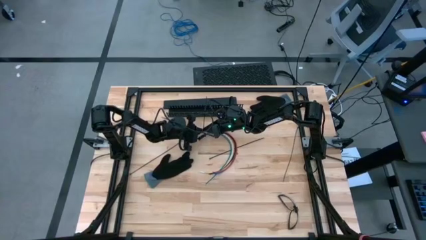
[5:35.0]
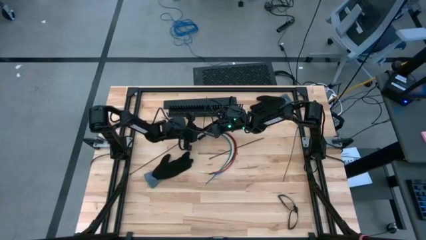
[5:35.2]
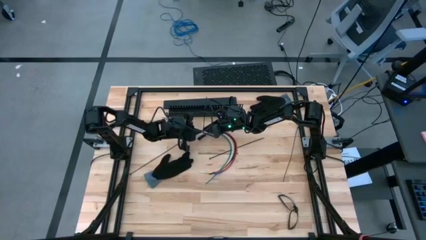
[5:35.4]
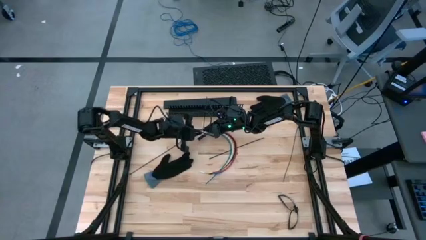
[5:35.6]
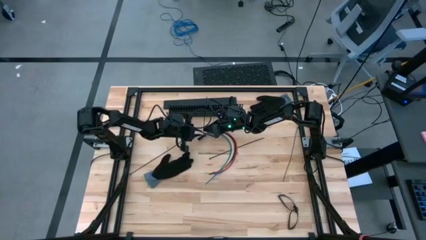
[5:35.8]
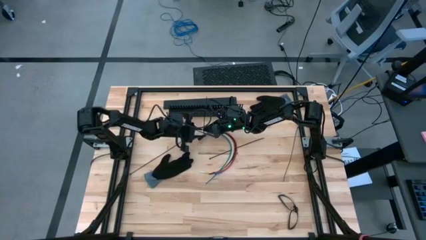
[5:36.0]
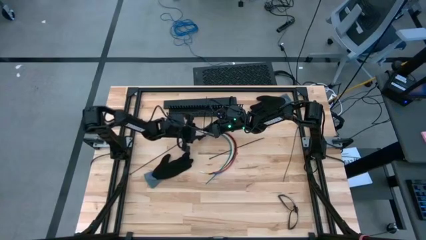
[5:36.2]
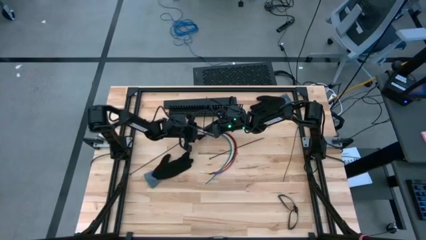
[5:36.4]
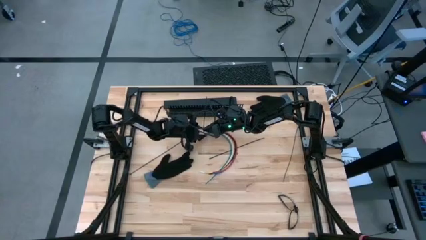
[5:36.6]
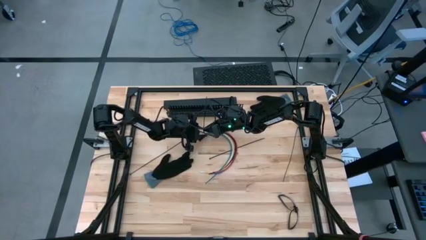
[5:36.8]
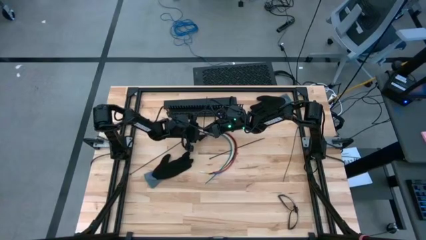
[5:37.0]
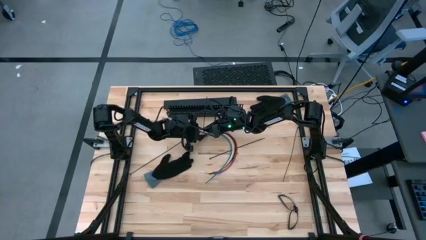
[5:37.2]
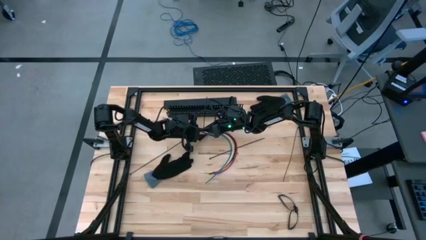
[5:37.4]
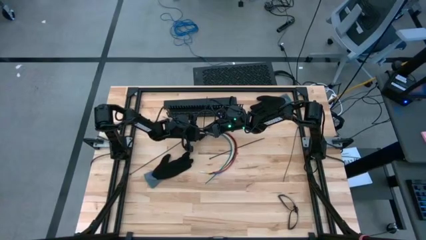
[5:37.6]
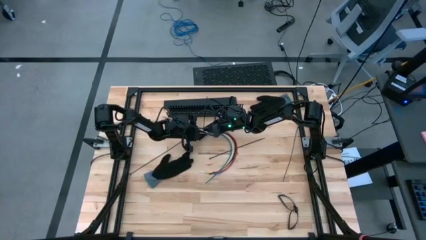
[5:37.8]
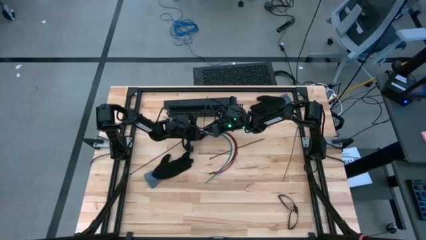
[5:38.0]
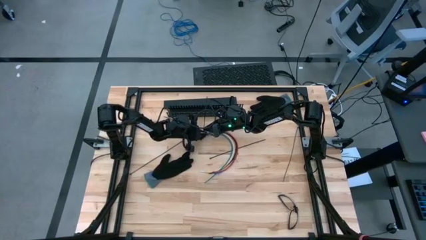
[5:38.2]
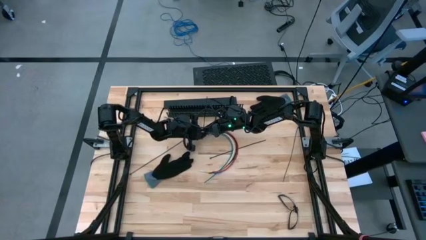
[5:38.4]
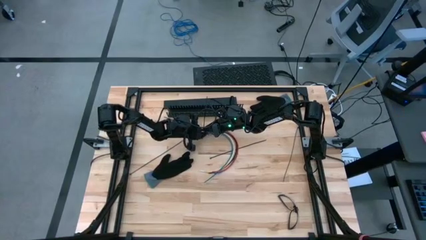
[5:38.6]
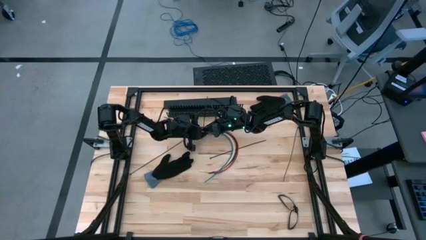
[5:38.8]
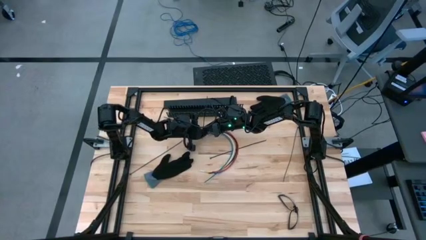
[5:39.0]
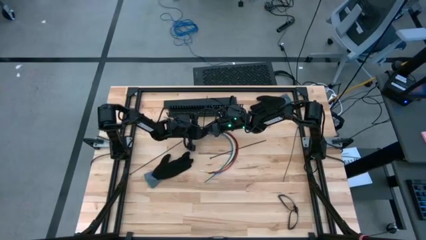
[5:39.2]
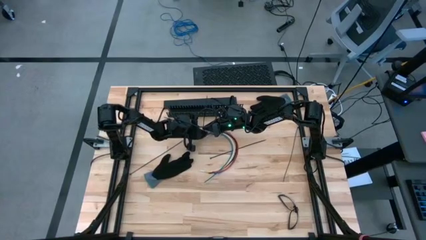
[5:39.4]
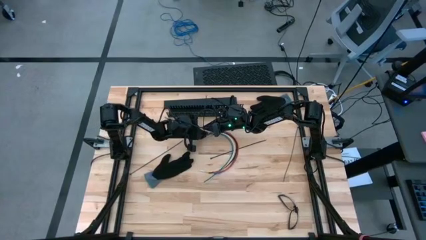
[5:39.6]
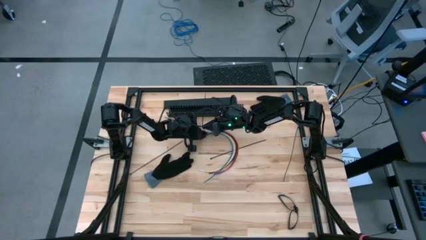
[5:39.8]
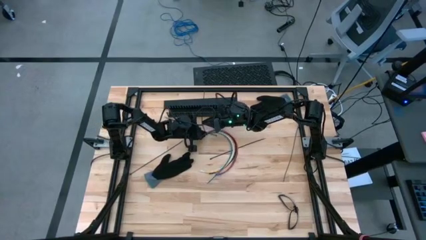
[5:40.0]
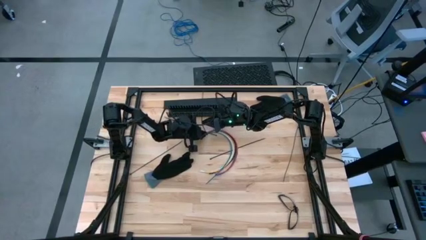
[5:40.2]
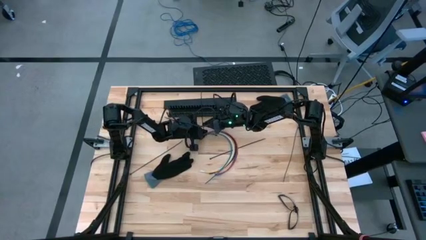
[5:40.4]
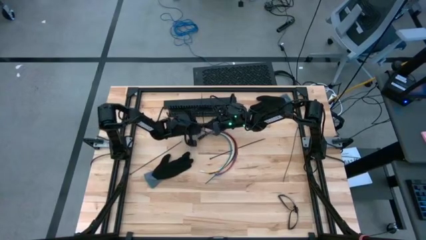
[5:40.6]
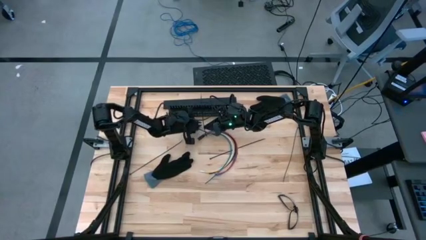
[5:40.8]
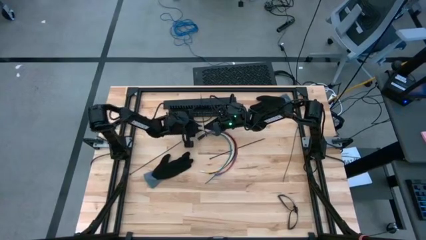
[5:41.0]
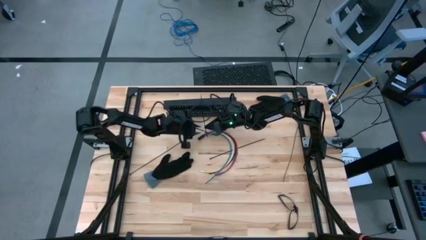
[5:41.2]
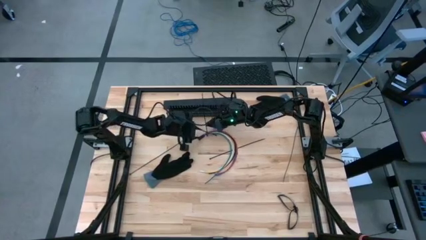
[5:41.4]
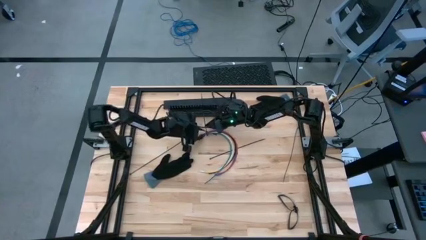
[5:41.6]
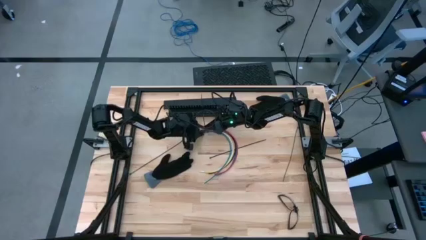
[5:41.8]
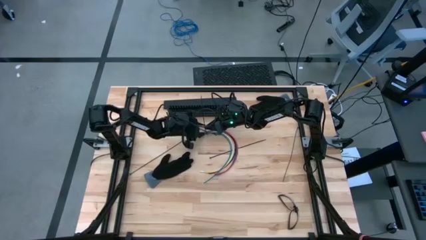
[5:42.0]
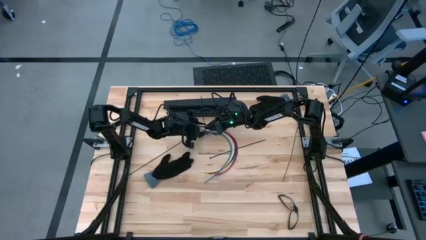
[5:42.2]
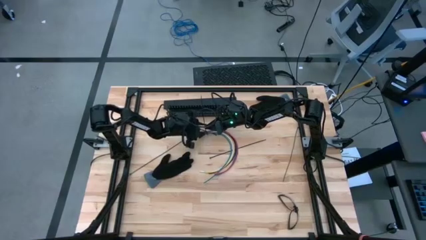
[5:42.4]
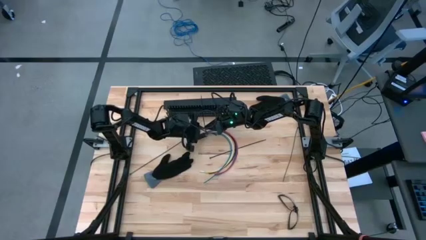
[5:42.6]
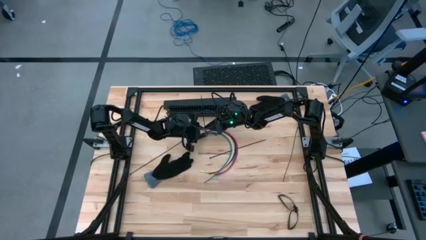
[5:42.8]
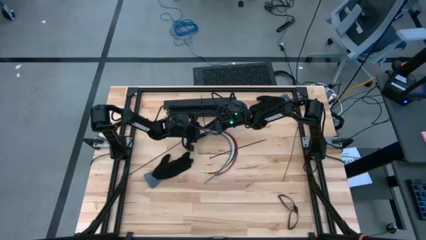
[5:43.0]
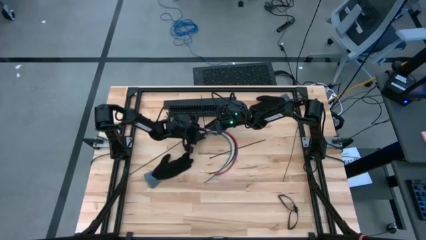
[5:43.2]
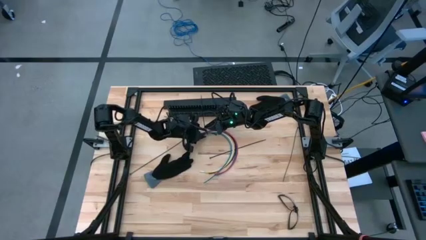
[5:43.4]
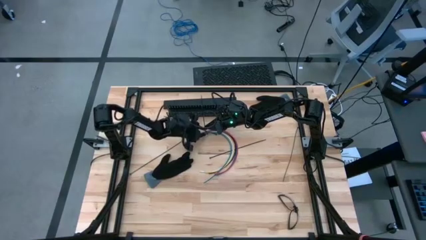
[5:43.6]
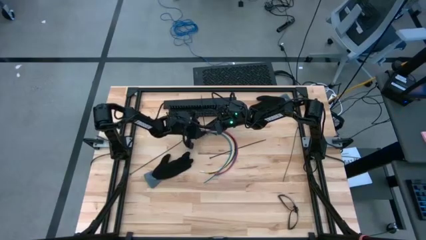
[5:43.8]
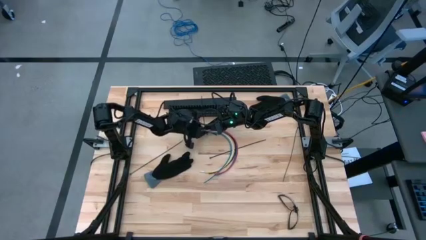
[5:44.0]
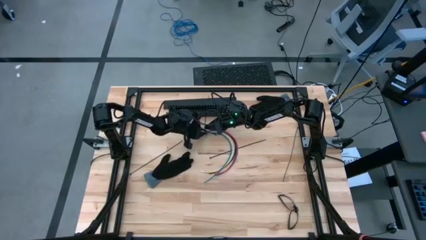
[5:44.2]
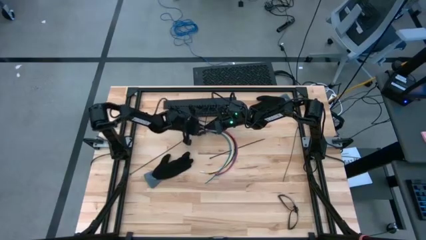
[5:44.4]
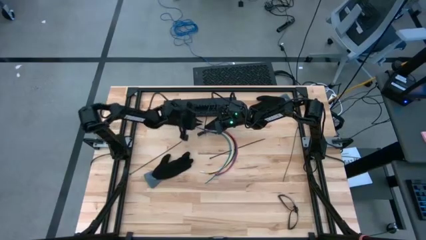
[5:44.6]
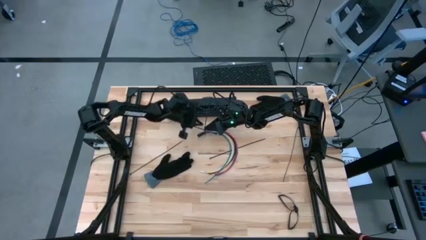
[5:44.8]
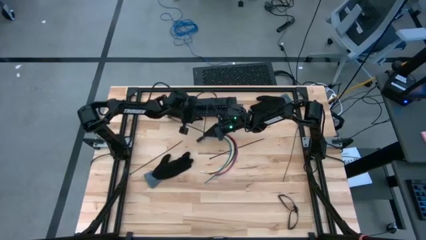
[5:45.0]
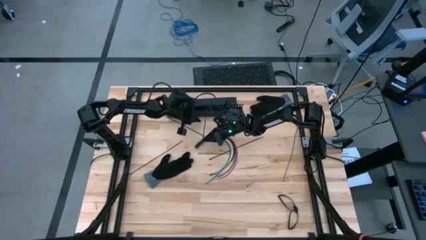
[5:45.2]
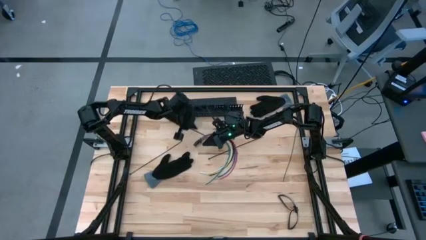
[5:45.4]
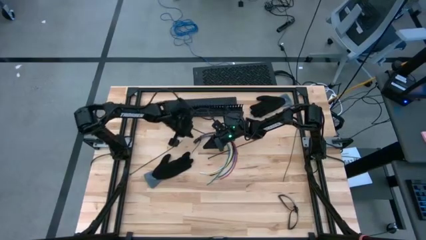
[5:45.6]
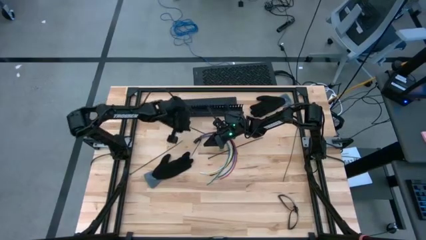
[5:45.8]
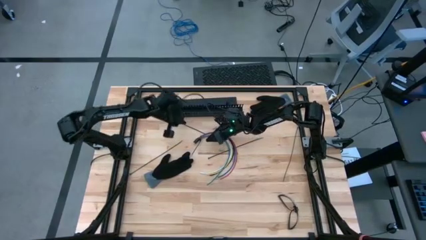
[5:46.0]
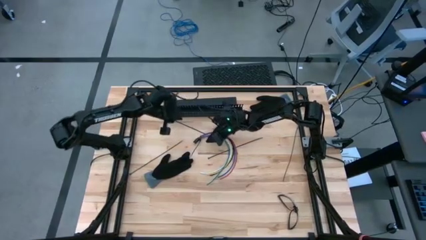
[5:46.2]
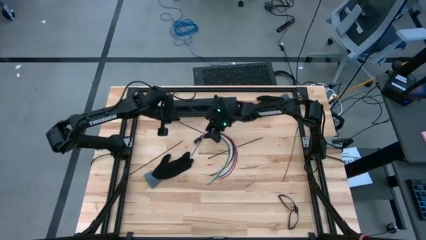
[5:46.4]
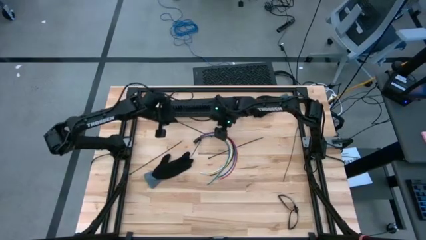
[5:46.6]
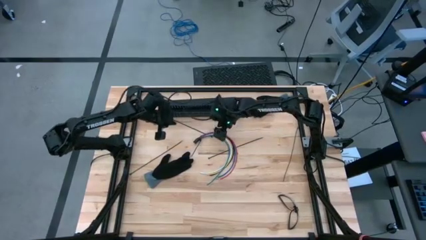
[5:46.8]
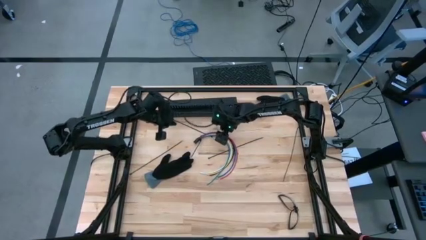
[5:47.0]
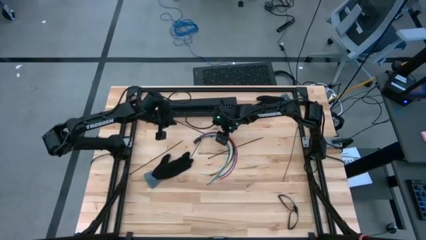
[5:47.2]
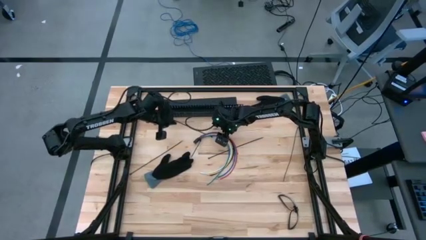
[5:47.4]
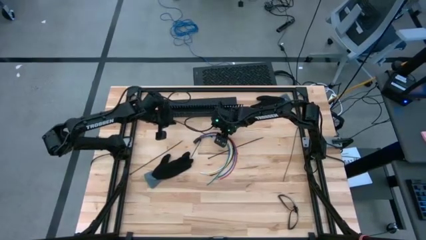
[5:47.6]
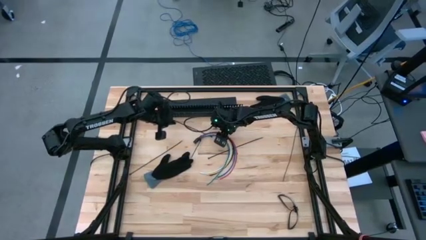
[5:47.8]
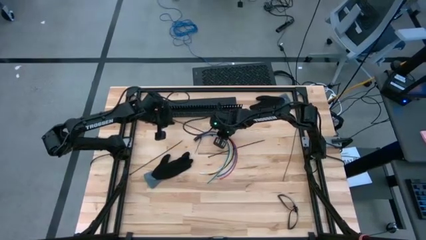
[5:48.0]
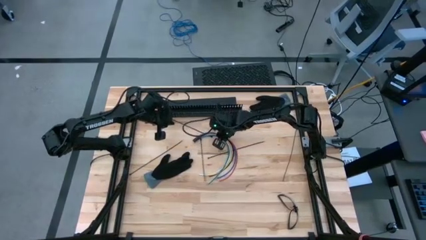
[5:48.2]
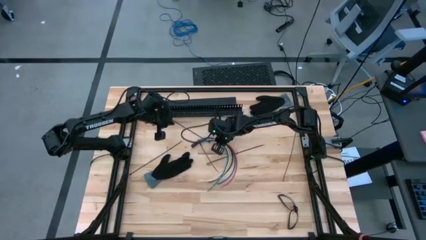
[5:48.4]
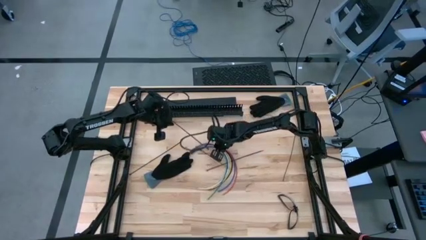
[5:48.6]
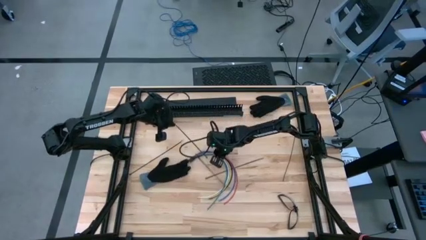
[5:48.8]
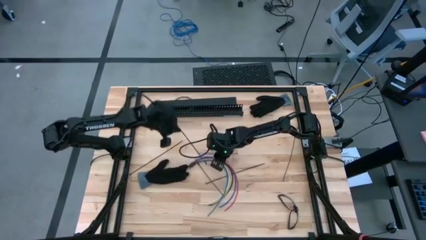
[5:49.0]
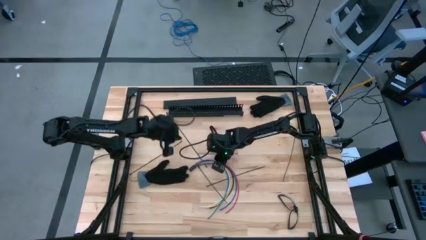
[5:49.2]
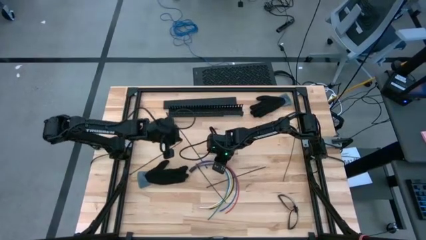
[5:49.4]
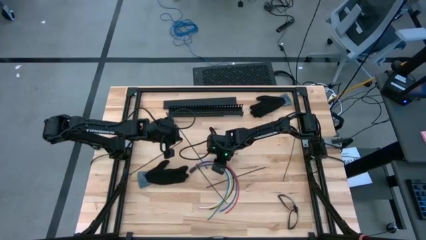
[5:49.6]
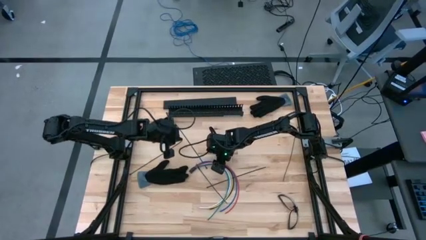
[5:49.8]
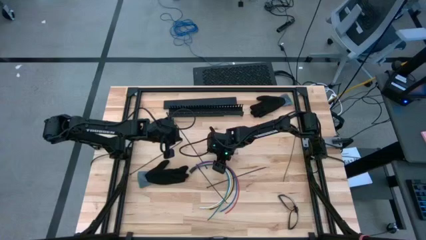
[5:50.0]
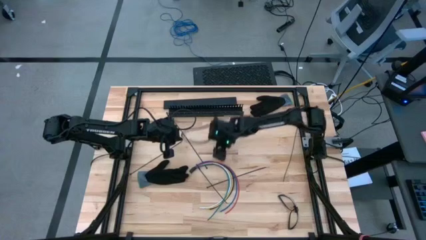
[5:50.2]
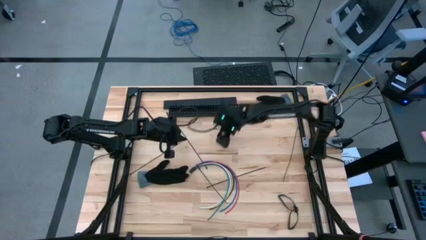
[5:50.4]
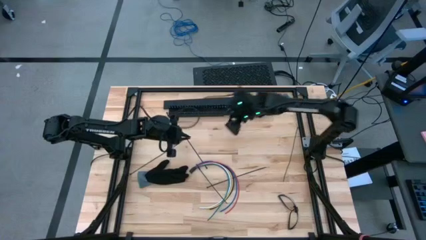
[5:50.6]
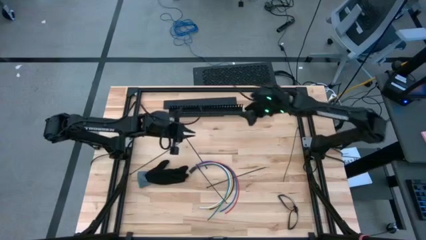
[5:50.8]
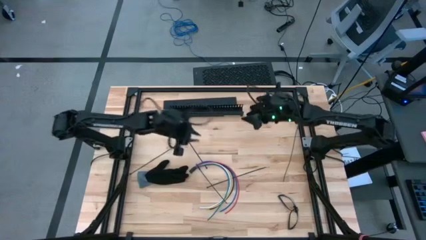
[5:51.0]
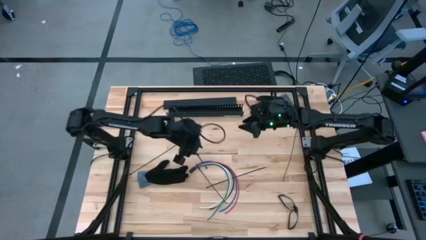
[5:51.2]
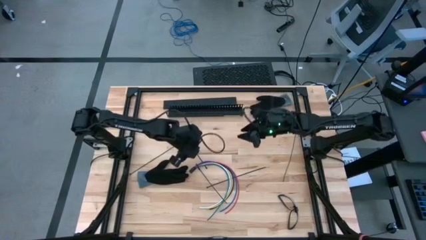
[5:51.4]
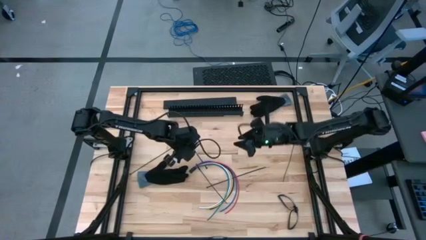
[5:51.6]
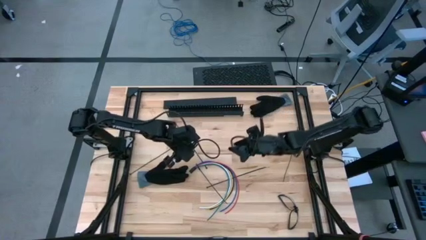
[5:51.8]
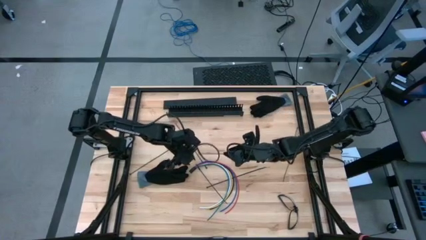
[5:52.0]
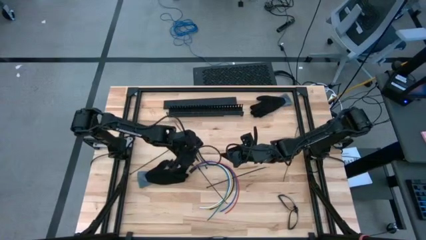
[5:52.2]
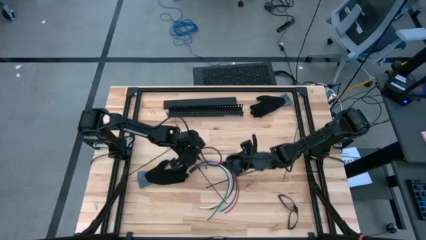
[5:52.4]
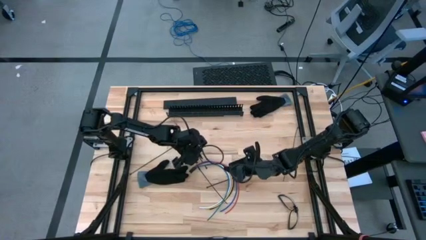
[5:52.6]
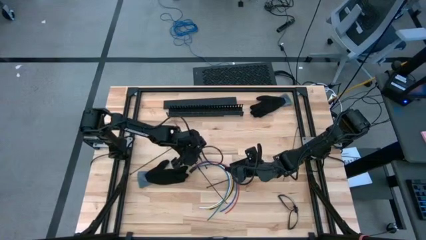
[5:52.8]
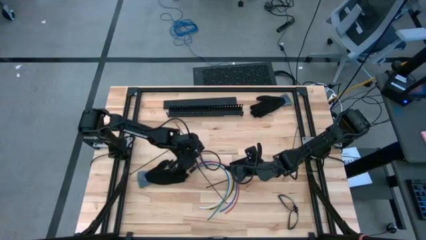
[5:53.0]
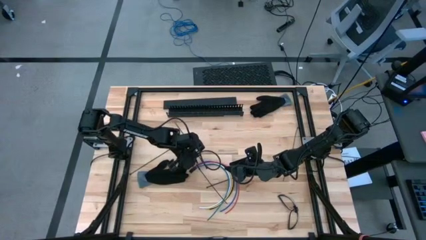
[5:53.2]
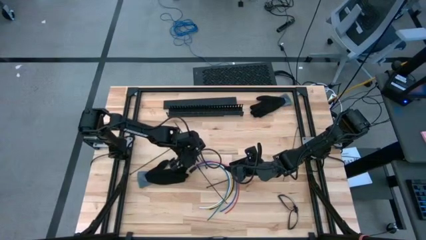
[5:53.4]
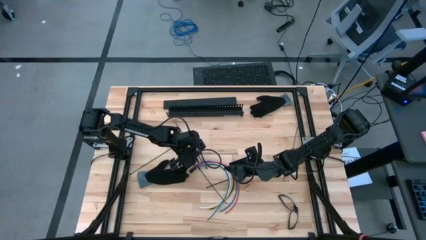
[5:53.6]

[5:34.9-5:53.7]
Task: Ziptie cables
Wrap the cable wires using a zip tie
